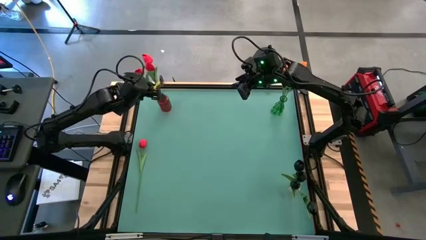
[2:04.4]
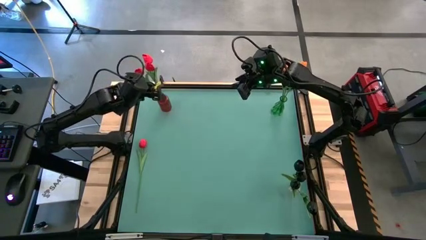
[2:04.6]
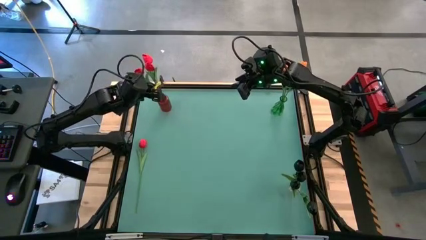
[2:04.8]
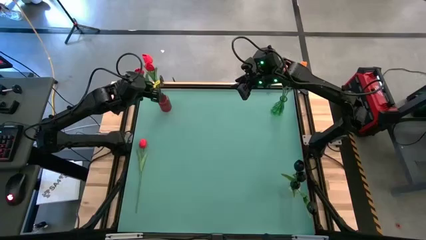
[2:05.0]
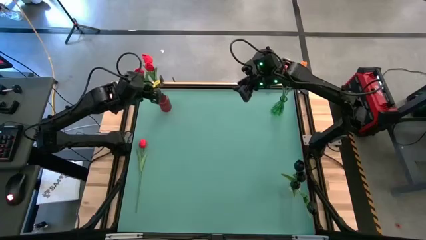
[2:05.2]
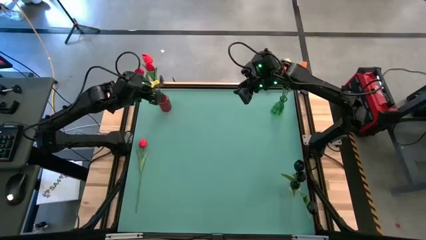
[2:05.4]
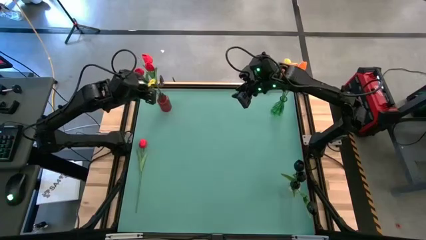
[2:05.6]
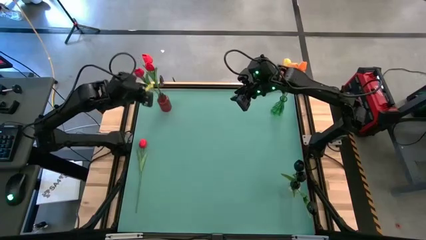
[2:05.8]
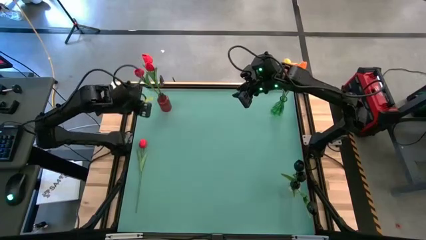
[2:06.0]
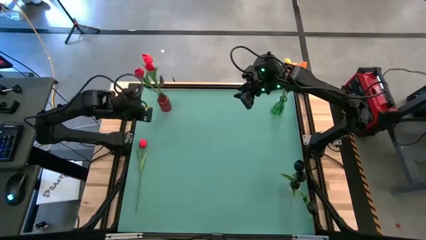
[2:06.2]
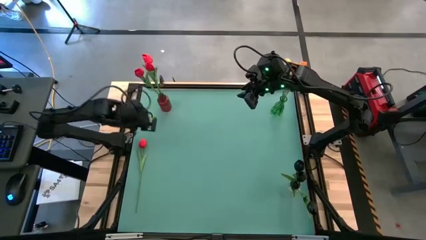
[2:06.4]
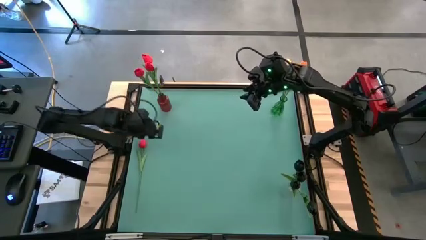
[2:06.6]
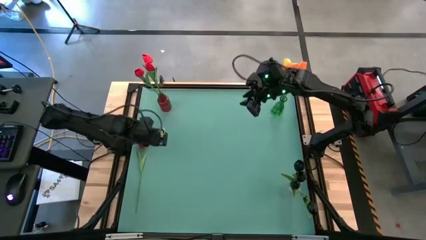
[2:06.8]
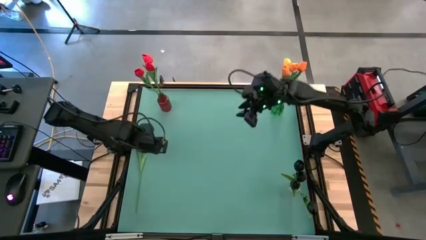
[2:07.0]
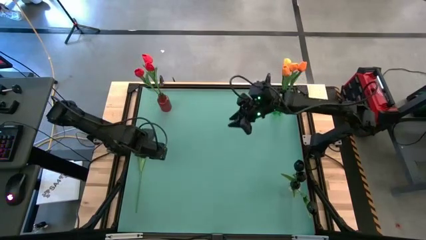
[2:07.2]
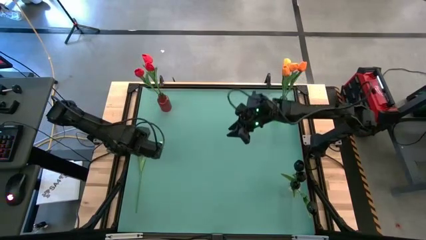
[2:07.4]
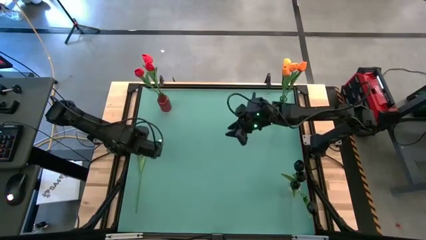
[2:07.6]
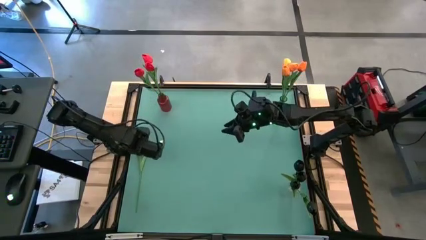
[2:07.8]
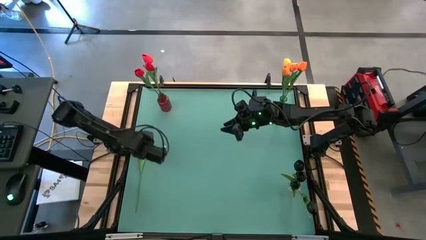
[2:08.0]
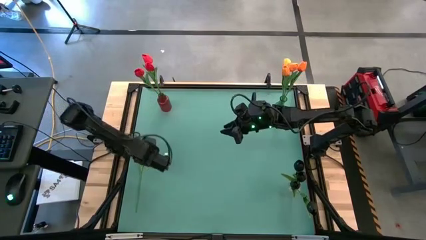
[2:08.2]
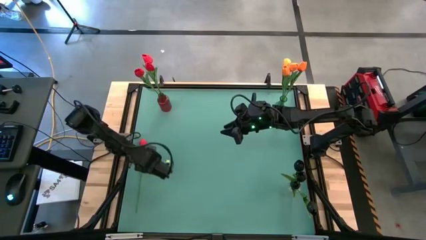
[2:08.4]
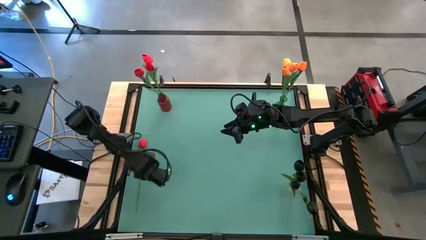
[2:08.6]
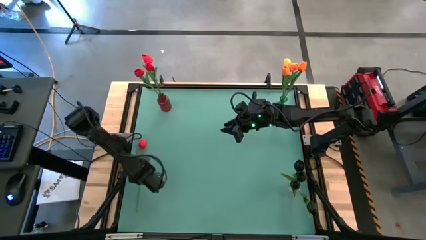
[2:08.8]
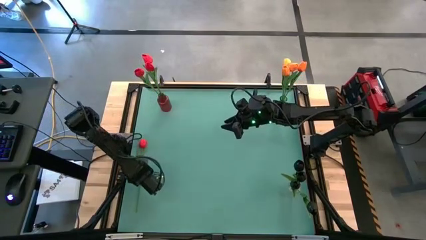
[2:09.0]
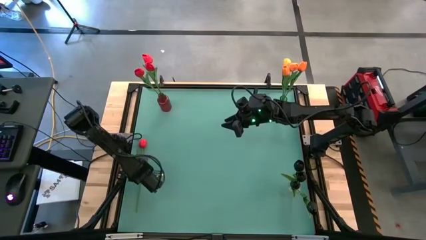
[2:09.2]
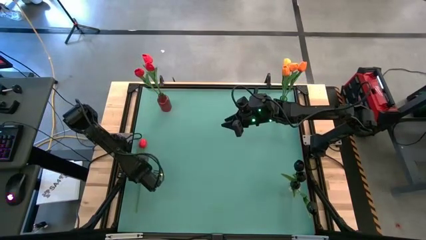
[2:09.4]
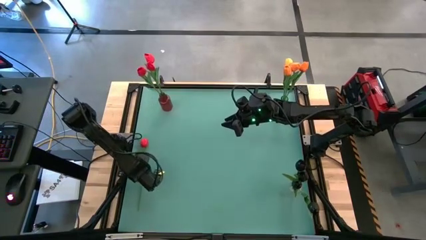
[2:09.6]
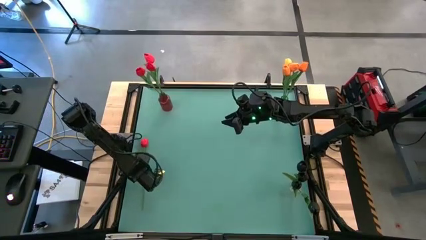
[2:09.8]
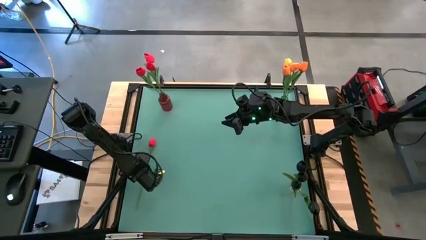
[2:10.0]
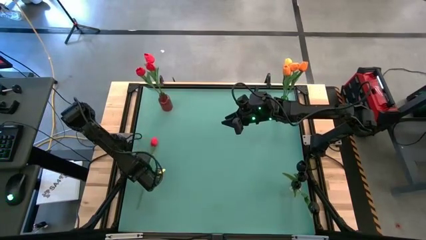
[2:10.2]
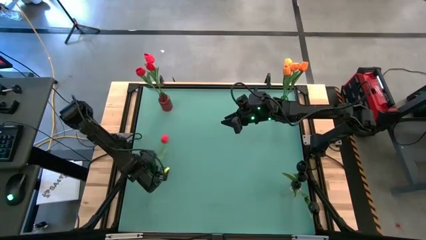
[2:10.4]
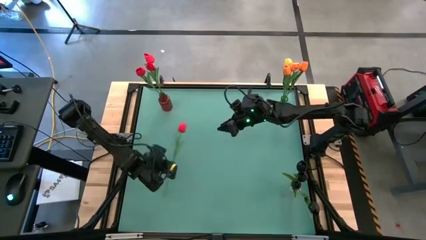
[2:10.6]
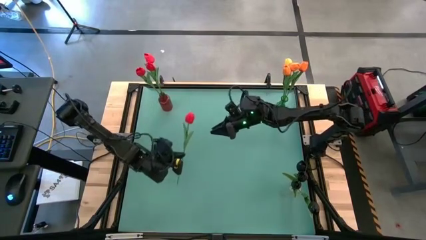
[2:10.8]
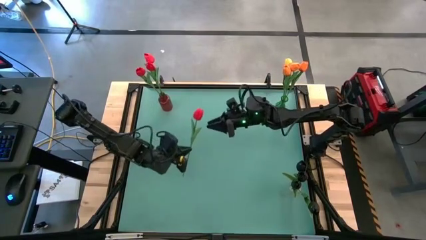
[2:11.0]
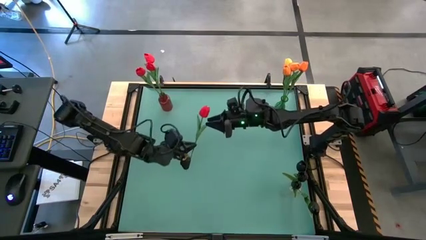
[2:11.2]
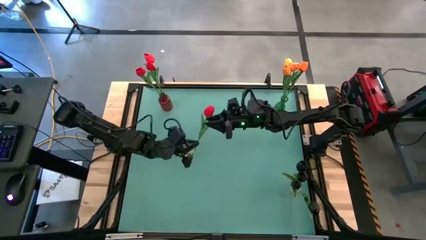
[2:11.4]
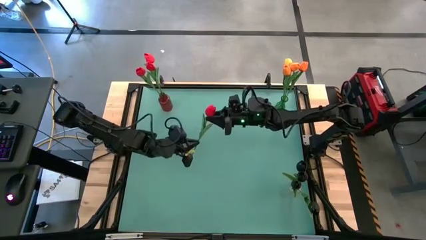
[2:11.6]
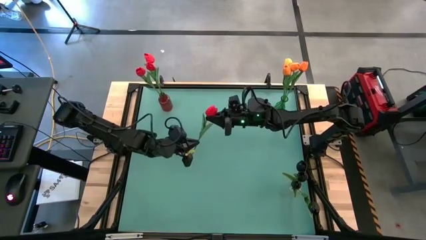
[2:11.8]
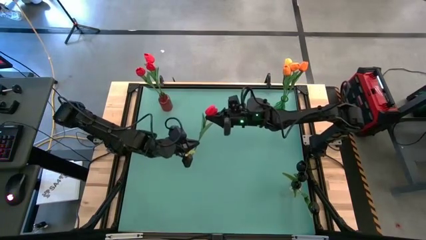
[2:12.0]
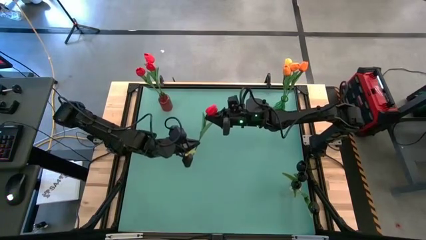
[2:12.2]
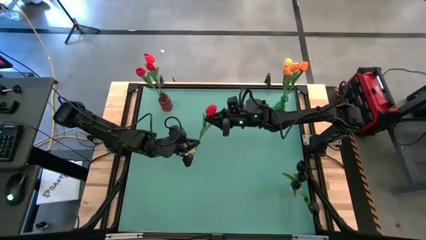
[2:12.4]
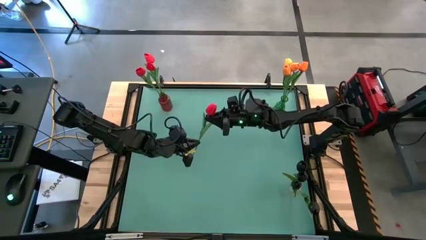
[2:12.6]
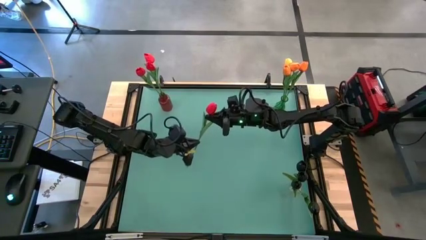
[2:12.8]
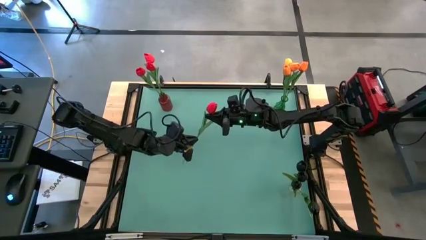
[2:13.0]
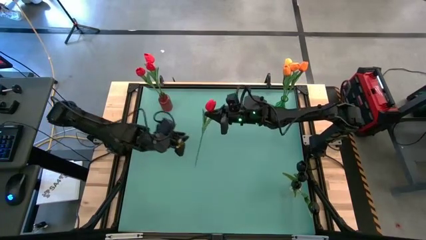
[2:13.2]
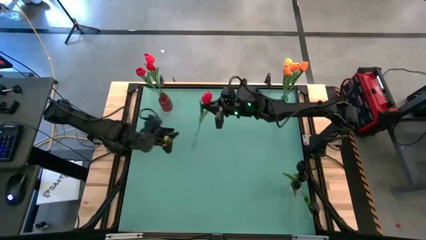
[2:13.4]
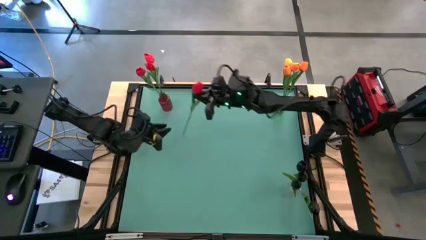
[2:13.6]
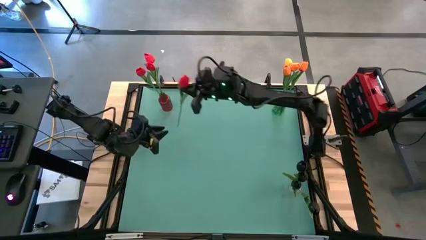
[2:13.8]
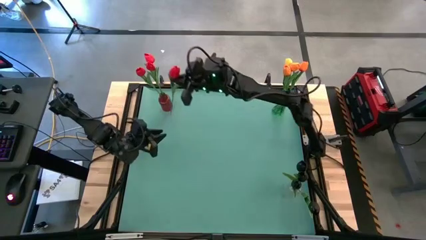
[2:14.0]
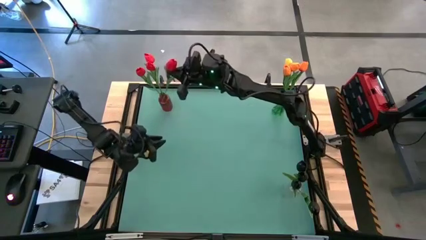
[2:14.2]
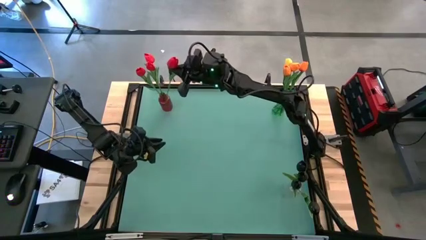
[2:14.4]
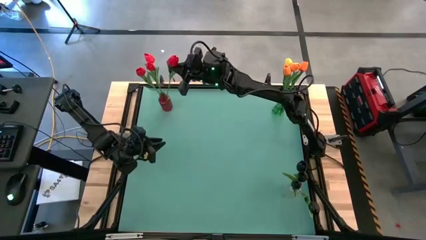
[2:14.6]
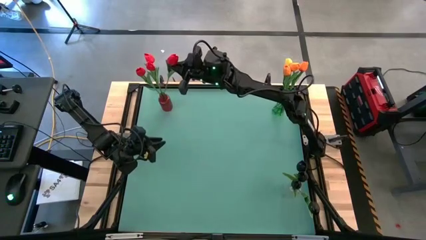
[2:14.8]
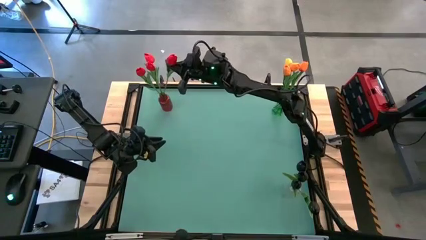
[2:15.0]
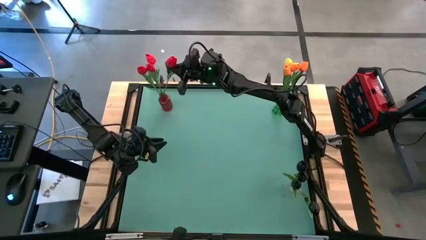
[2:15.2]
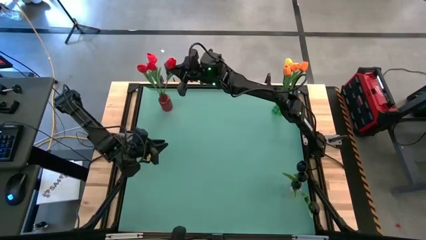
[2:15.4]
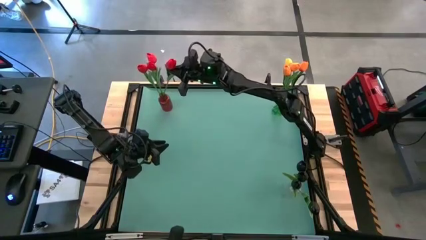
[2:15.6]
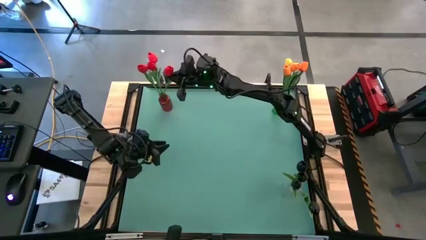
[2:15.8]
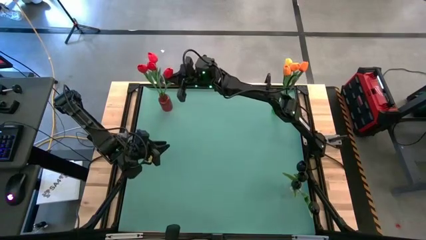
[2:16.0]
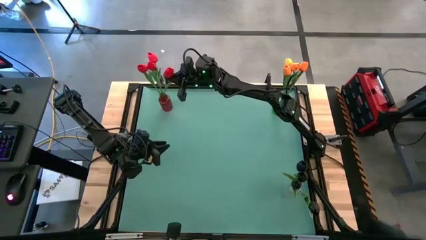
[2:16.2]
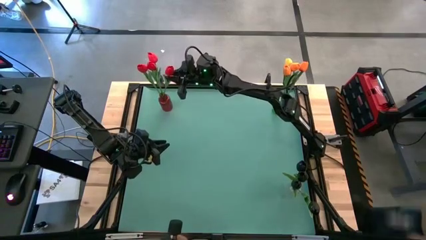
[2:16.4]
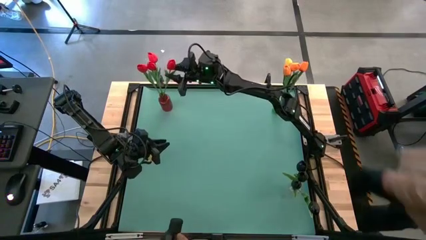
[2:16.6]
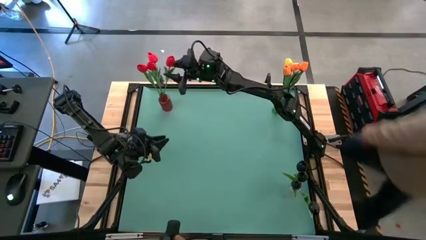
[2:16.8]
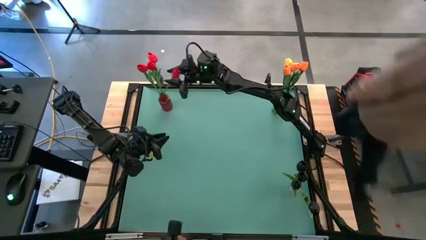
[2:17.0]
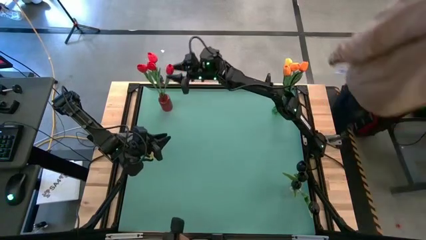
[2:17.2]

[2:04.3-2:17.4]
Task: Sort flowers into vase by color
Put the red tulip into the red flower vase

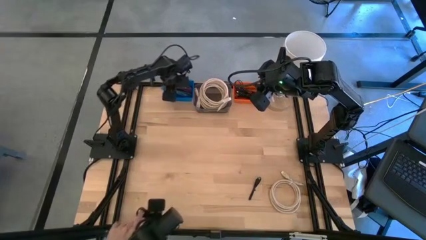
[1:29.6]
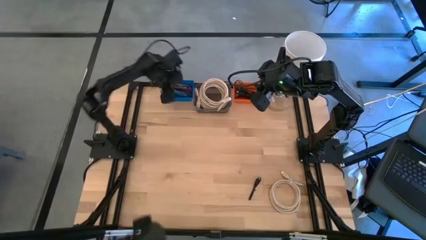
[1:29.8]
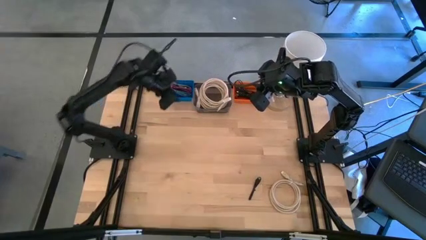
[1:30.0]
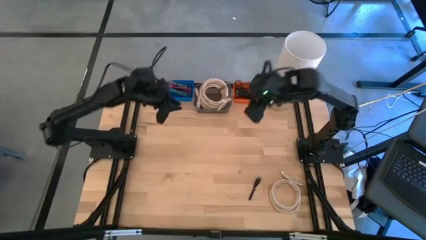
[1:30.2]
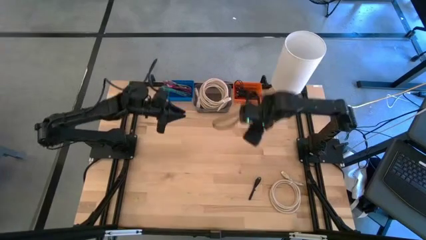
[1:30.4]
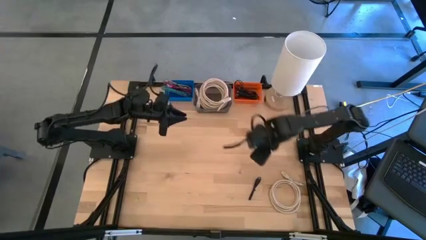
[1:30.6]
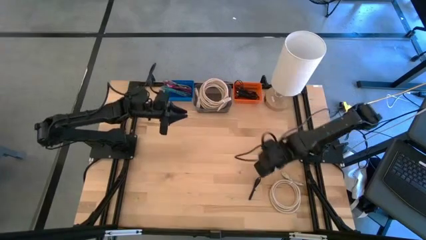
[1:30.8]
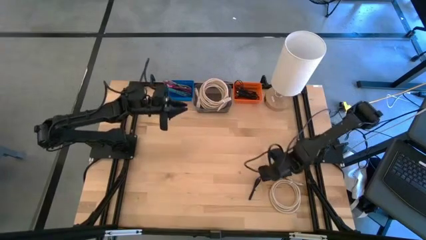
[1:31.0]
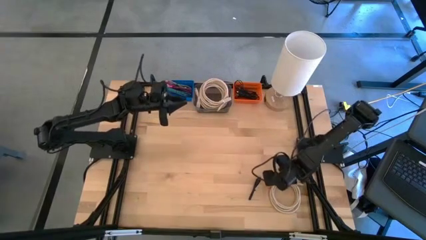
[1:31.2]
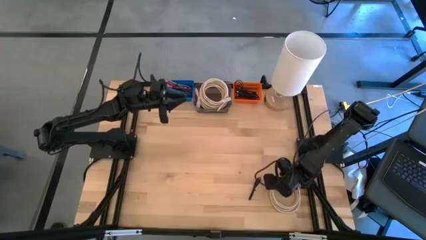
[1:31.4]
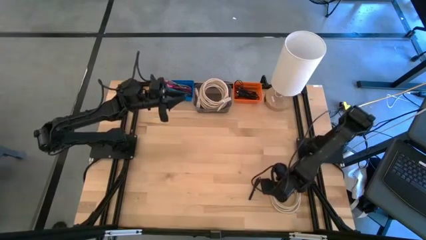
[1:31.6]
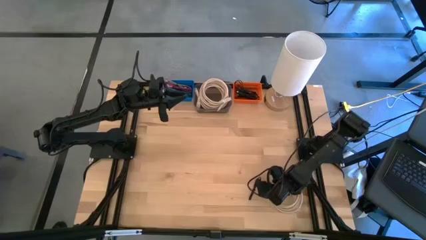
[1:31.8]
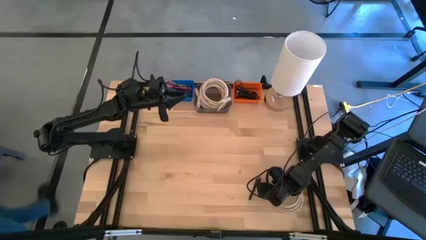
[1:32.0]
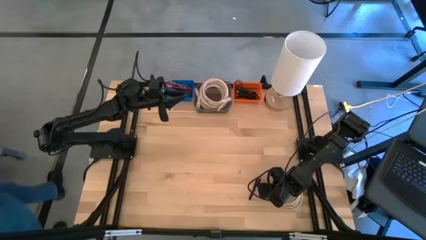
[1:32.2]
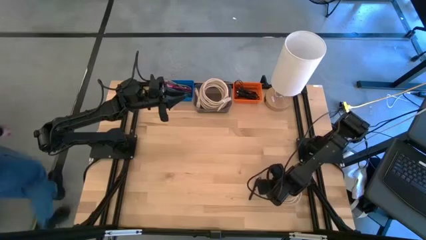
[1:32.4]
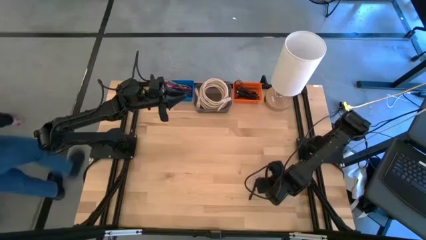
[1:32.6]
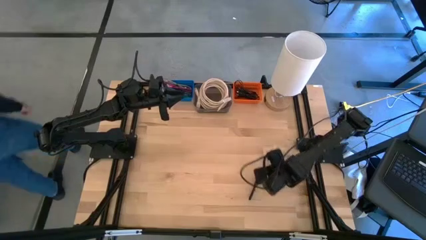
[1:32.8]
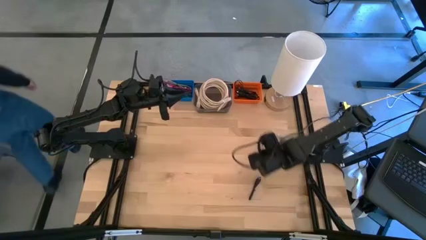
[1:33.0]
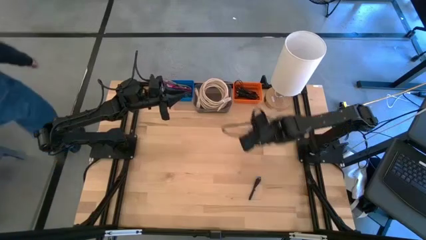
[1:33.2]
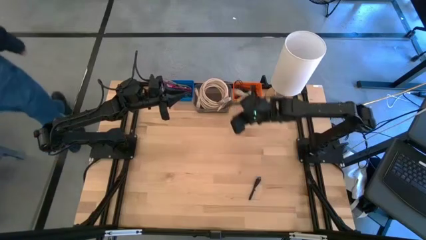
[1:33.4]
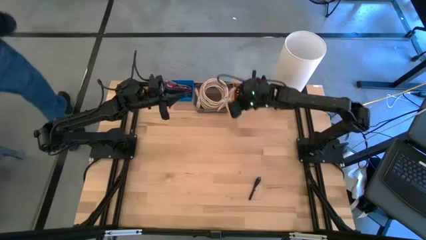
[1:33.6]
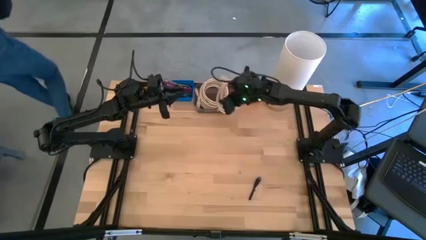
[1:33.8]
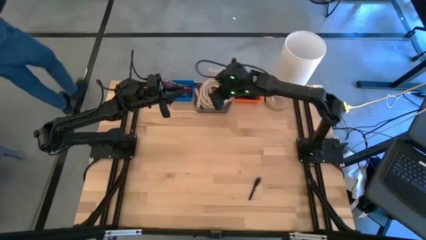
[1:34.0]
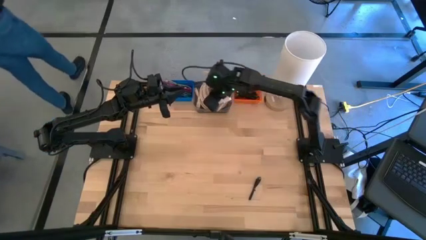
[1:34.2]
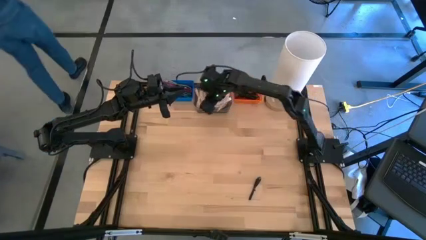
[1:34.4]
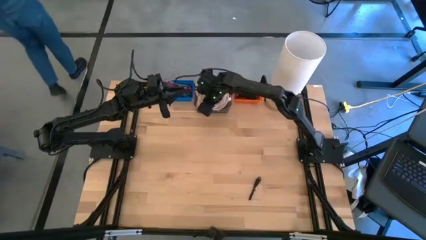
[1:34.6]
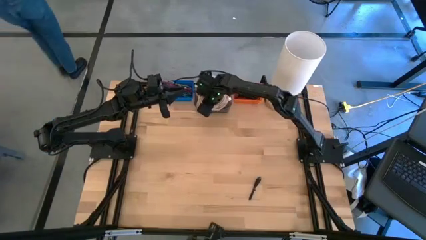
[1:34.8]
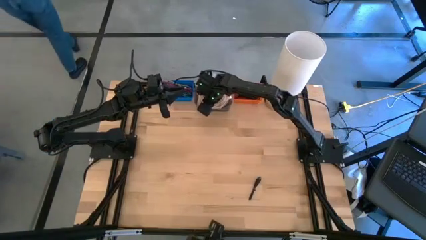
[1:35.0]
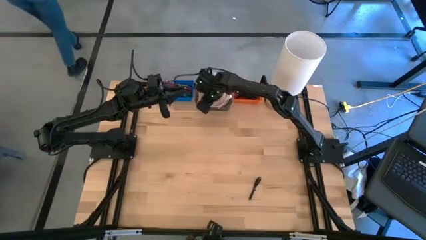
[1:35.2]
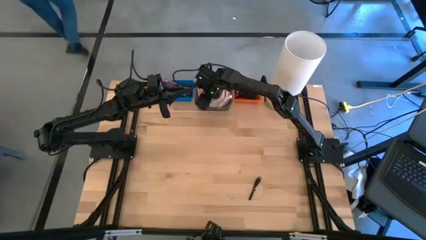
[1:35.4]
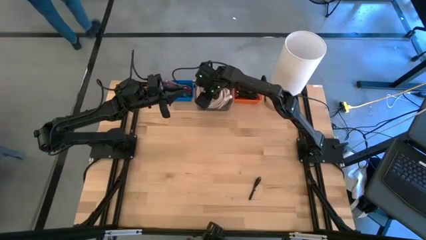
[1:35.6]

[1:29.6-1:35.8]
Task: Pick & Place USB Port
Put the brown HDMI cable into the black bin
